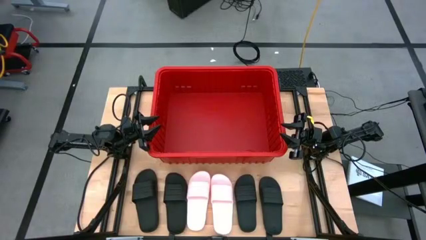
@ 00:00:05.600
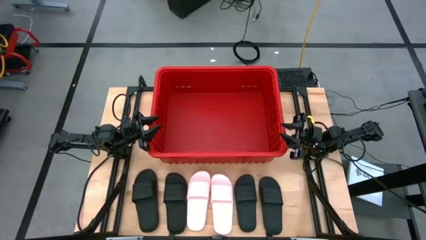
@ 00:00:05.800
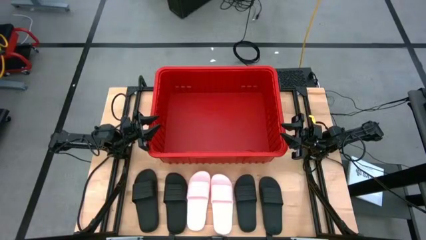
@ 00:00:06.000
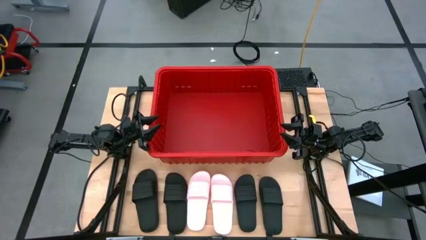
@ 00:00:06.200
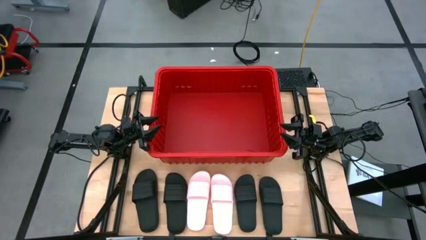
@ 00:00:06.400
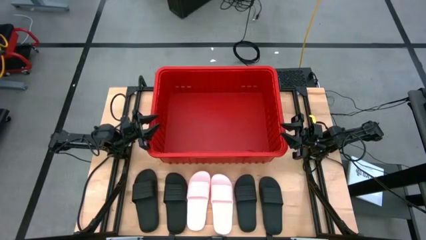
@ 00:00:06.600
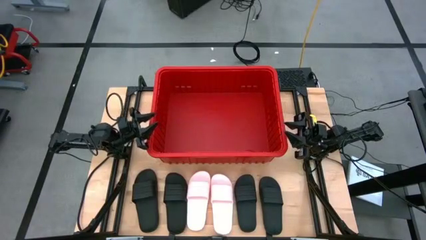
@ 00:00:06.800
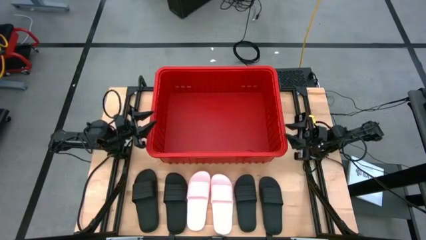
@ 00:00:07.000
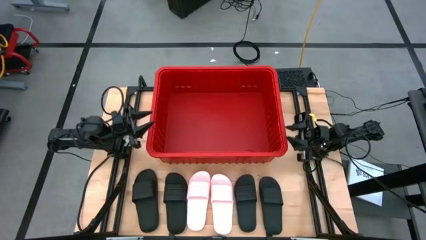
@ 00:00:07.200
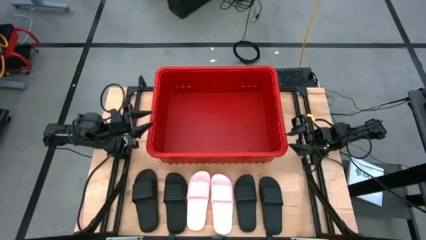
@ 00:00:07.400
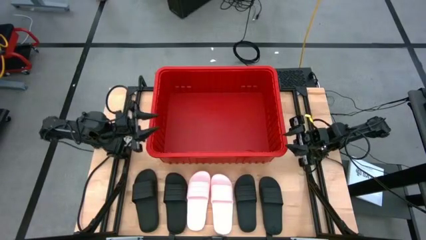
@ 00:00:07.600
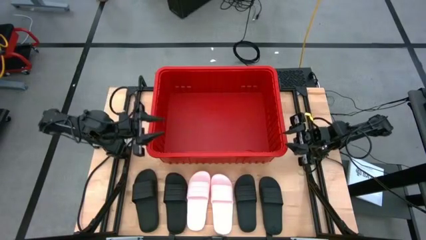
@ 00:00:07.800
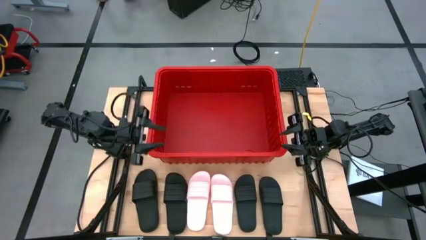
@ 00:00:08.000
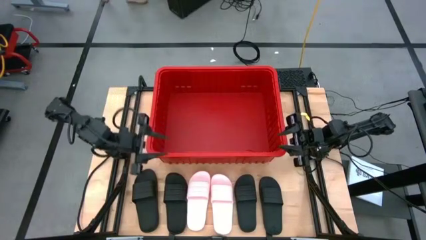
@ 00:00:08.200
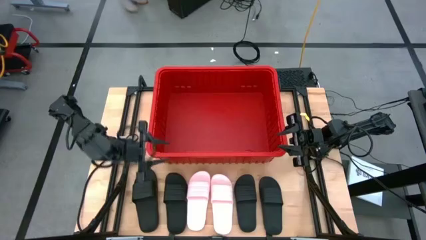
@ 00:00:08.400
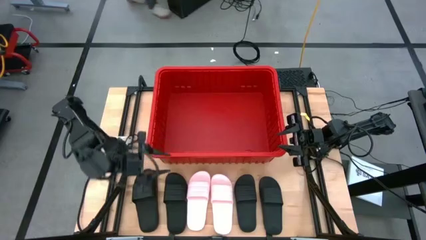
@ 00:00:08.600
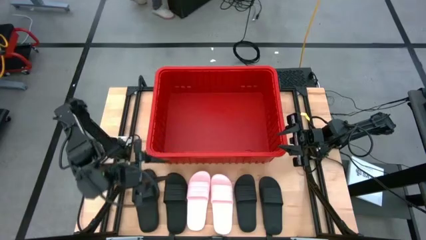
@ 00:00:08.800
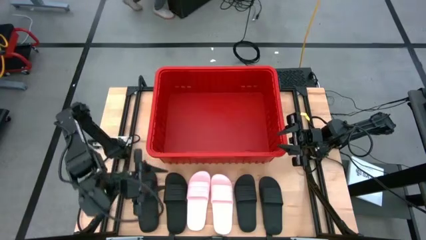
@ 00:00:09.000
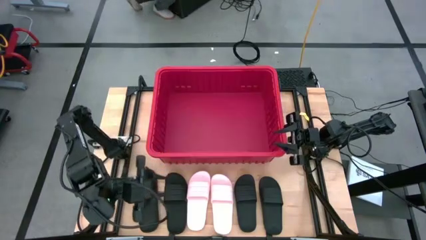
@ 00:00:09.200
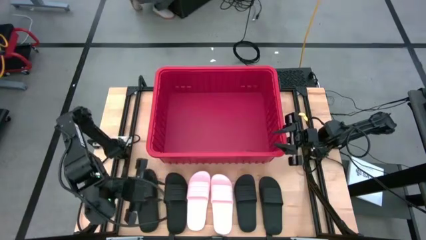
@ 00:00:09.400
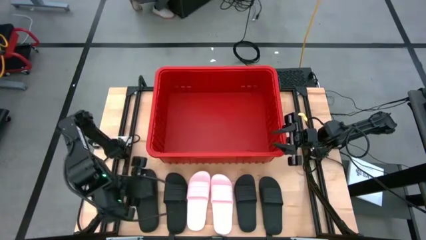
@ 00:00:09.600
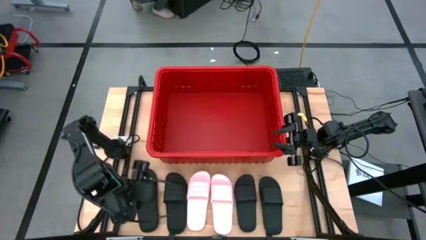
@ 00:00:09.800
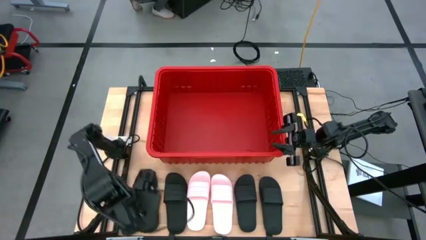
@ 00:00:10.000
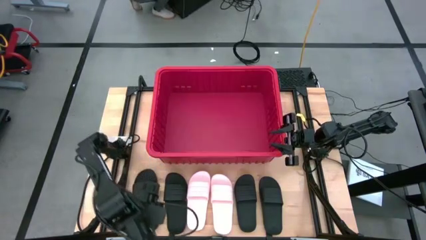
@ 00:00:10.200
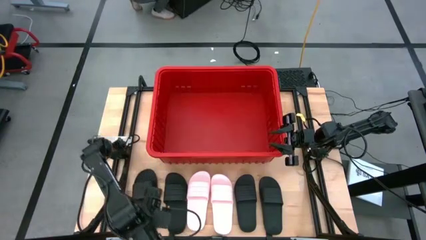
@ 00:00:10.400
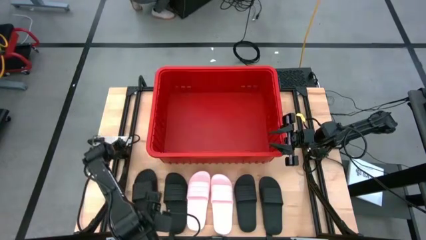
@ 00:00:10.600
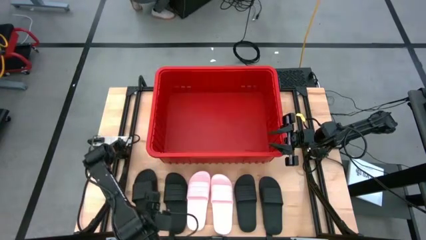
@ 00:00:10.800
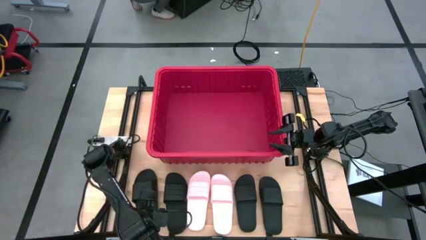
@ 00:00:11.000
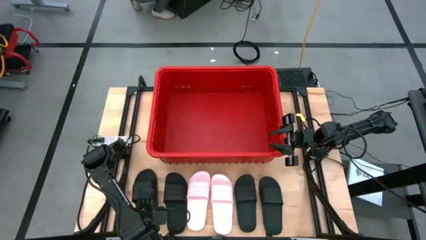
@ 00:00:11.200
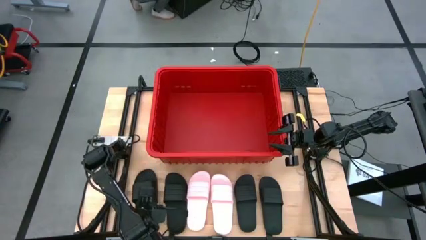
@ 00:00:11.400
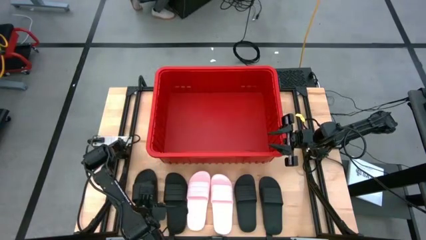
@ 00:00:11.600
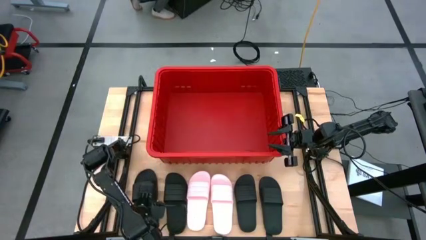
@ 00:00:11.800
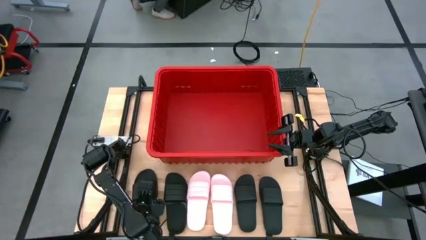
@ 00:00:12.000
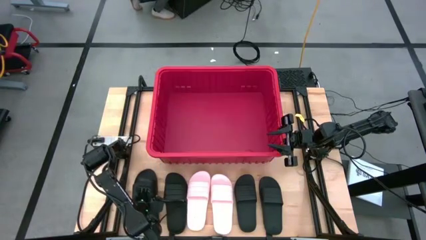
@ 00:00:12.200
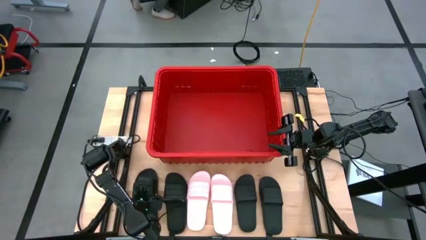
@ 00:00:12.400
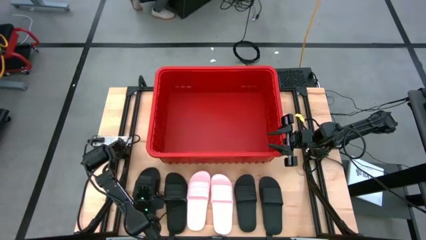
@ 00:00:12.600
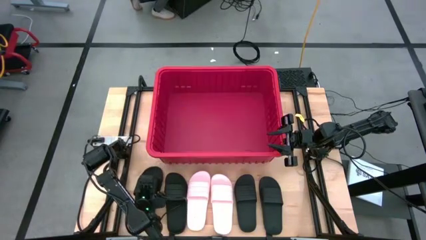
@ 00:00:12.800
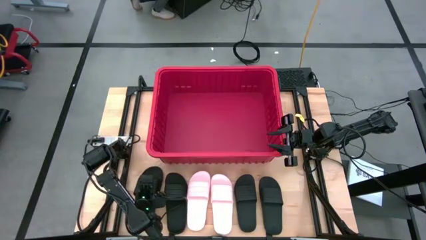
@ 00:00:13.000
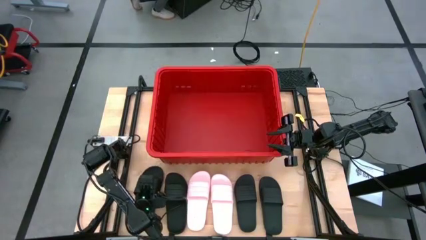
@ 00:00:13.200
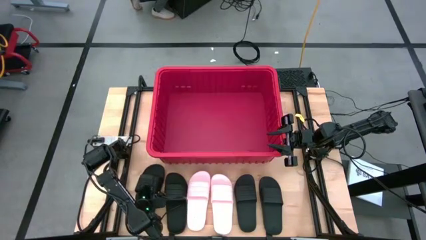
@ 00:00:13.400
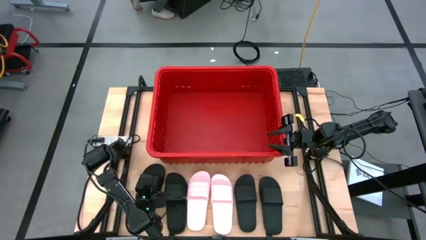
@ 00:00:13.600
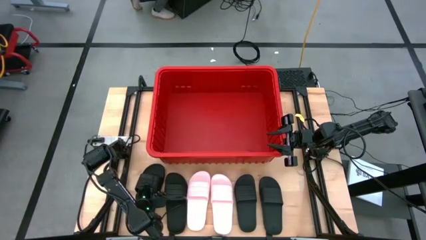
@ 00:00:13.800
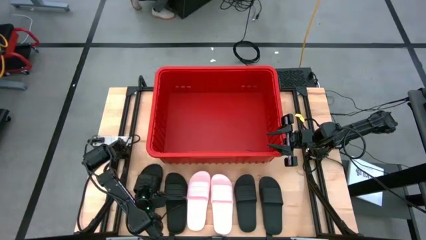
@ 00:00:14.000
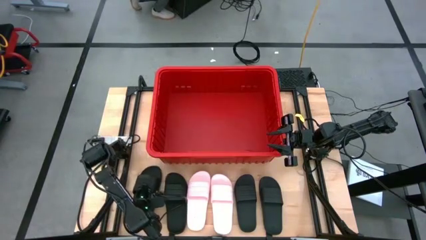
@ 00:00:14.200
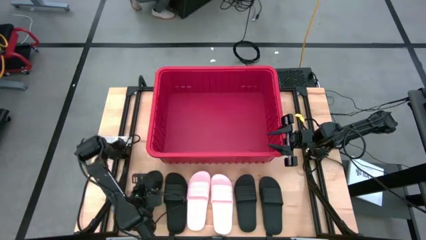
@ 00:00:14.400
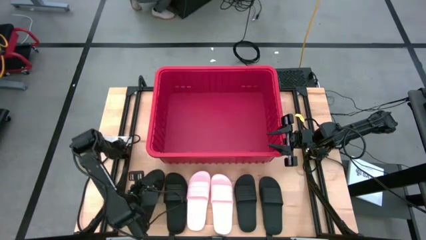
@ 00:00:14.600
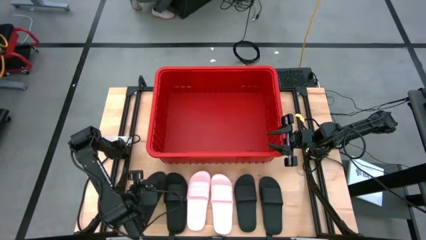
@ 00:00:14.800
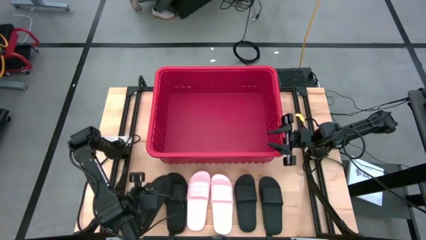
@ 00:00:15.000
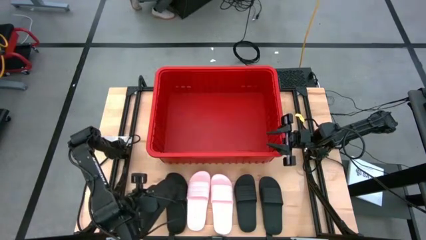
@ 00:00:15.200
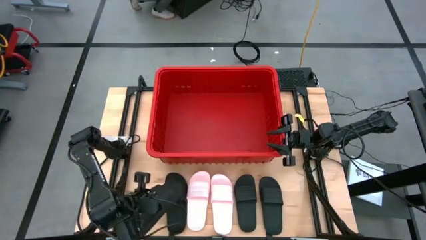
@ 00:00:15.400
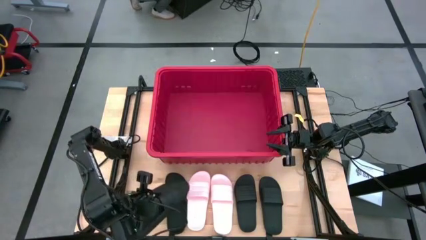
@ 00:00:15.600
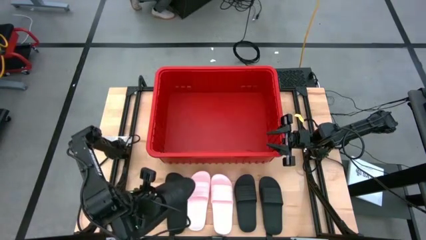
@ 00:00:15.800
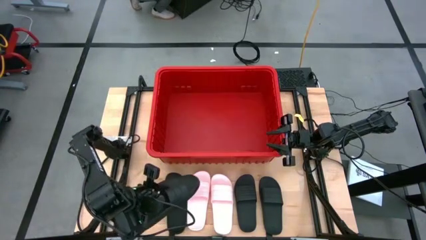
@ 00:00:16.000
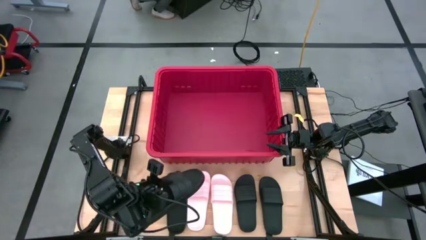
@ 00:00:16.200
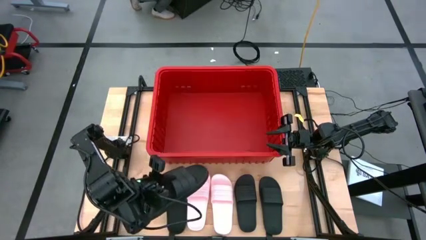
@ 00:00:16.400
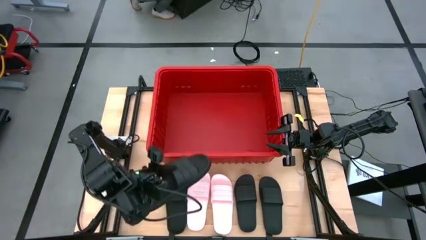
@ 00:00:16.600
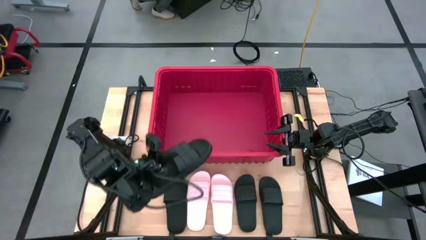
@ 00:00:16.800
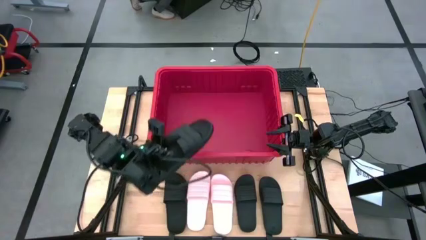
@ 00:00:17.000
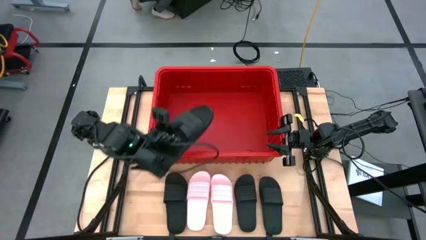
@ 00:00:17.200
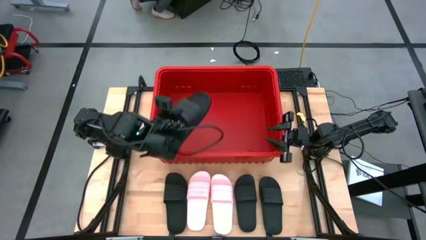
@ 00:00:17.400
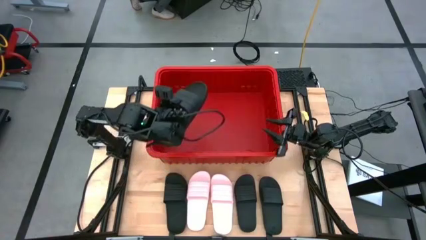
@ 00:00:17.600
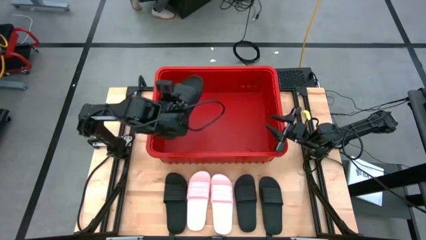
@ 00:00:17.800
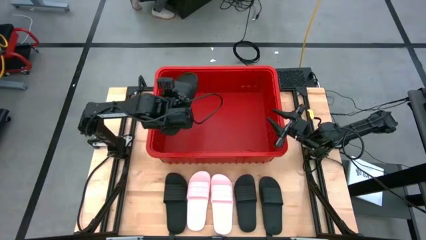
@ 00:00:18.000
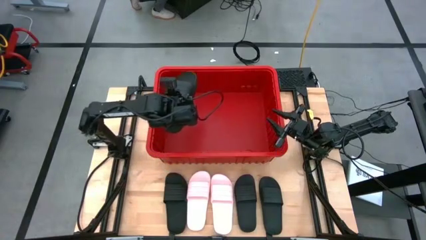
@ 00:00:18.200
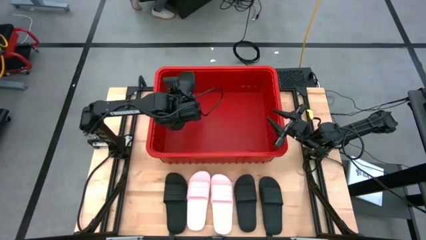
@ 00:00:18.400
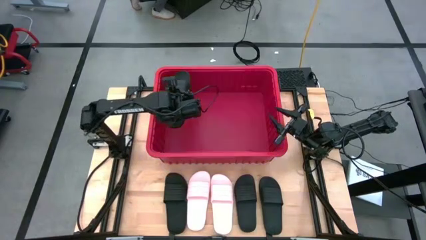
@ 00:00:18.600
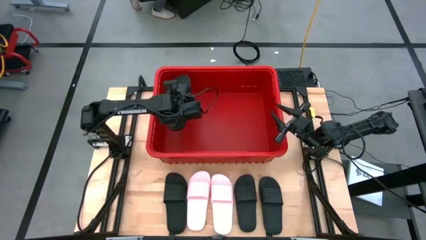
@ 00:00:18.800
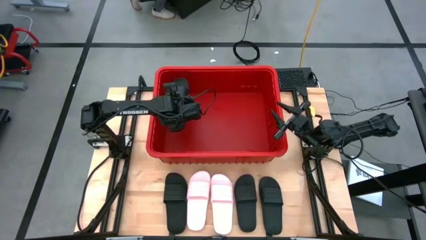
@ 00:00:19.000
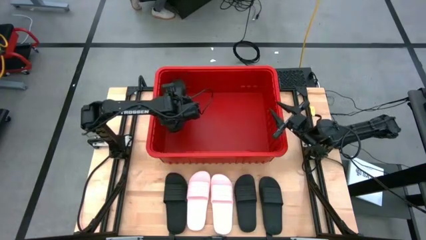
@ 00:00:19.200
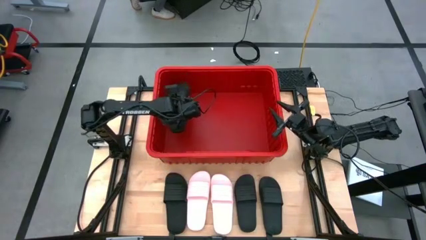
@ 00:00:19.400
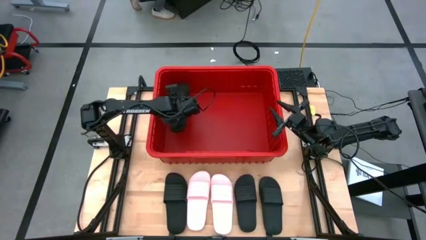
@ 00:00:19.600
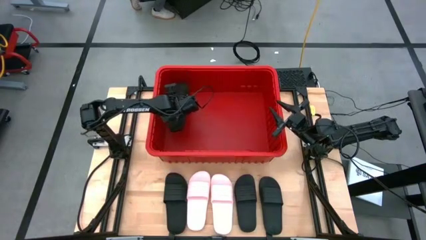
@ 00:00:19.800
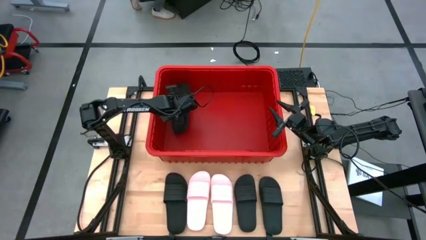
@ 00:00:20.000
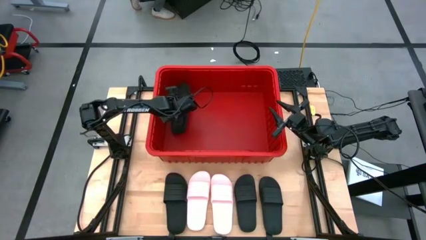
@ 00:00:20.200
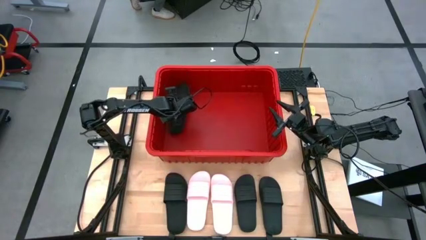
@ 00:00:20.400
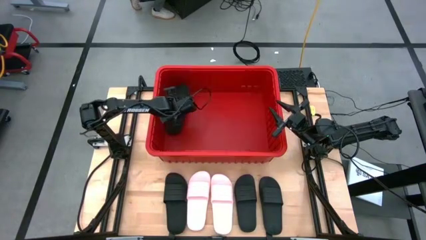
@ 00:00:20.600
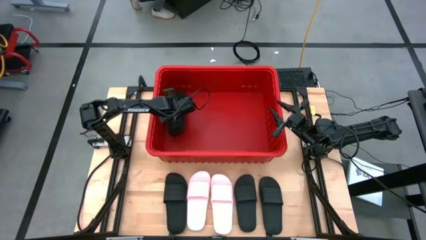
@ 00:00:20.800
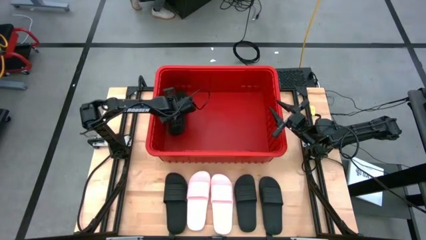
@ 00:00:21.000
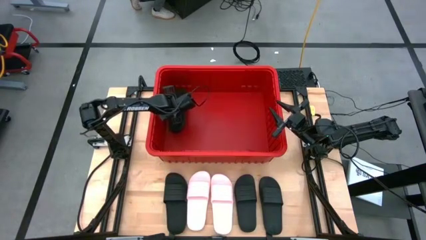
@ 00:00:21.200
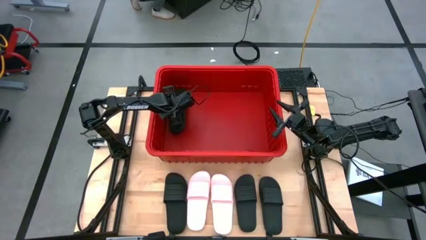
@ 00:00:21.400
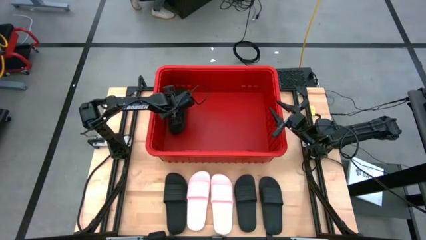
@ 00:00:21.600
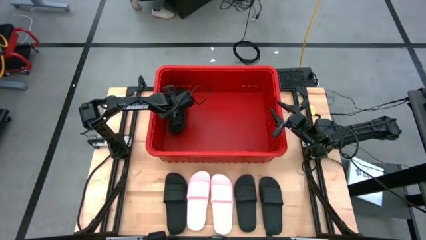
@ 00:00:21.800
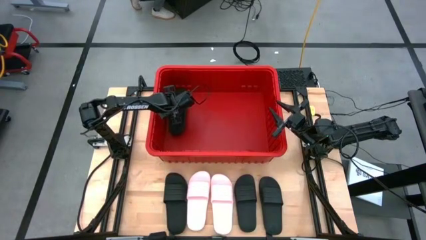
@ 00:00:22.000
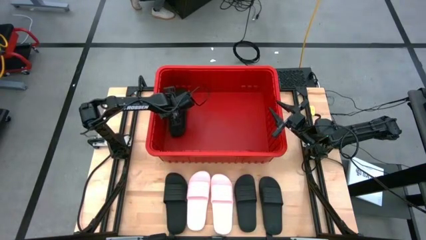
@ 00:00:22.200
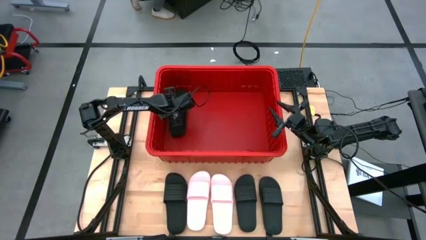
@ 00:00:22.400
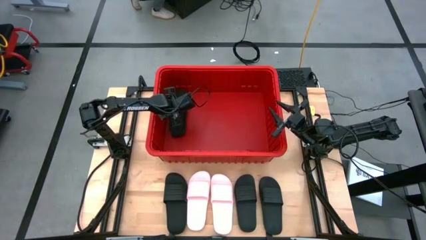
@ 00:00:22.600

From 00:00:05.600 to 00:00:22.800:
Task: Pick and place slides into bin
Put the black slipper into the organizer bin
